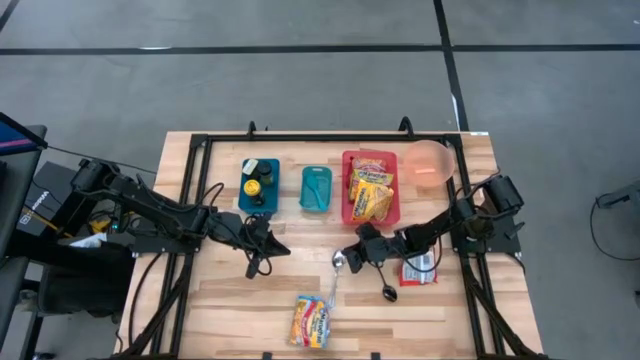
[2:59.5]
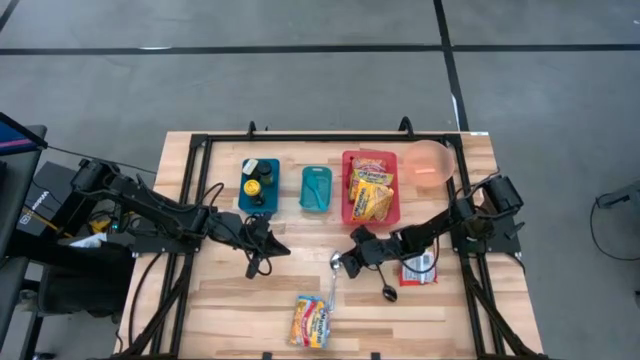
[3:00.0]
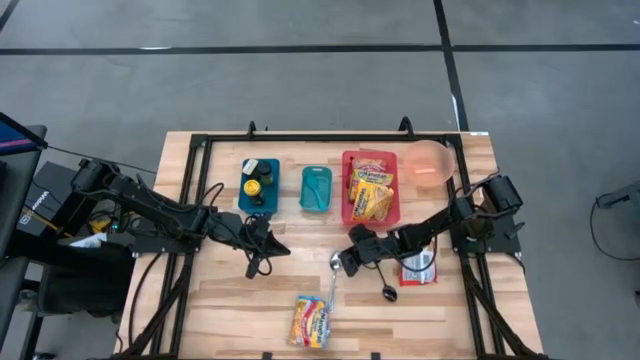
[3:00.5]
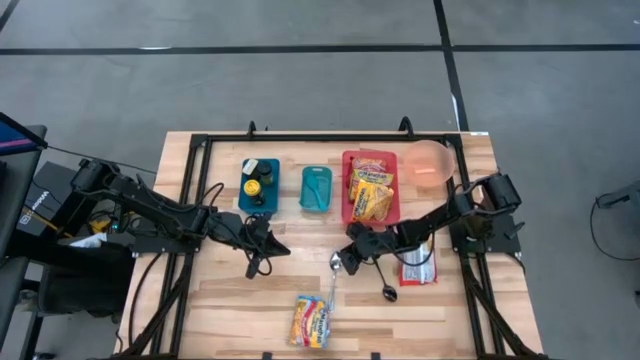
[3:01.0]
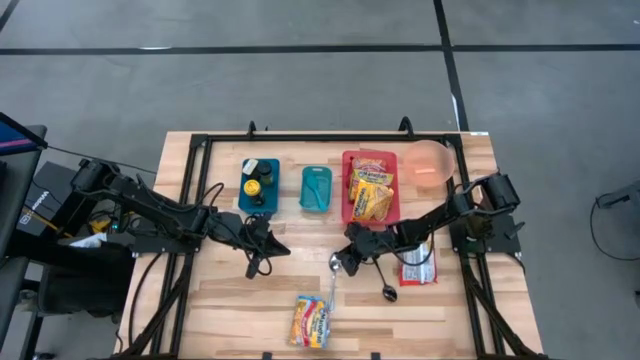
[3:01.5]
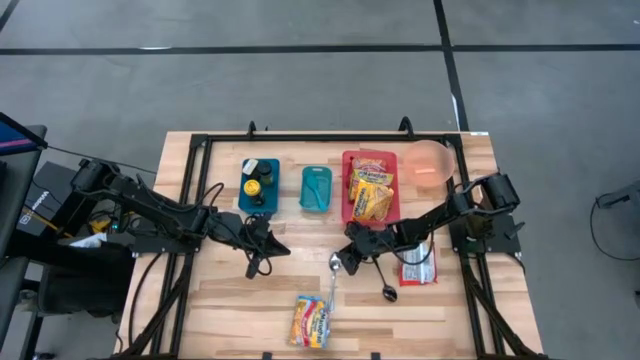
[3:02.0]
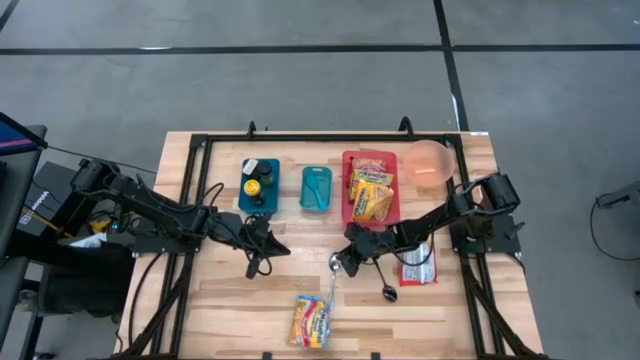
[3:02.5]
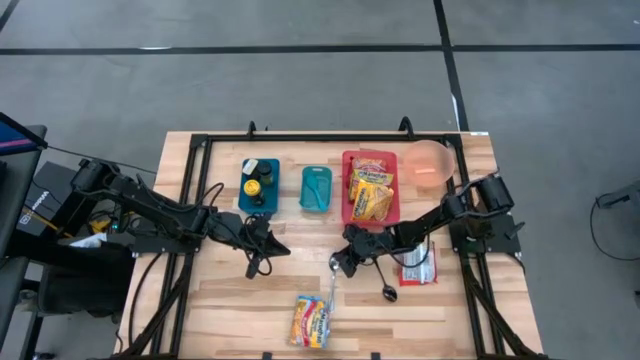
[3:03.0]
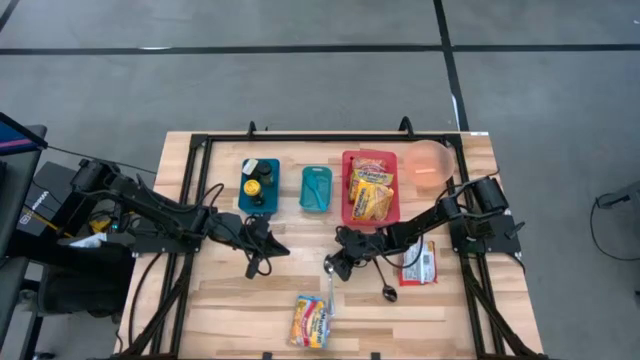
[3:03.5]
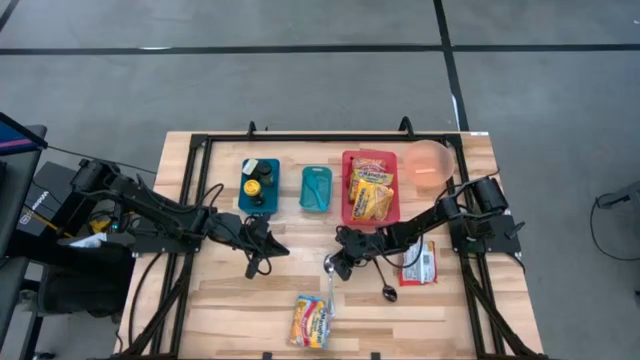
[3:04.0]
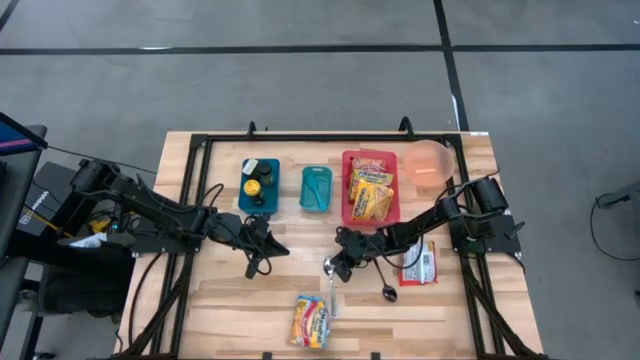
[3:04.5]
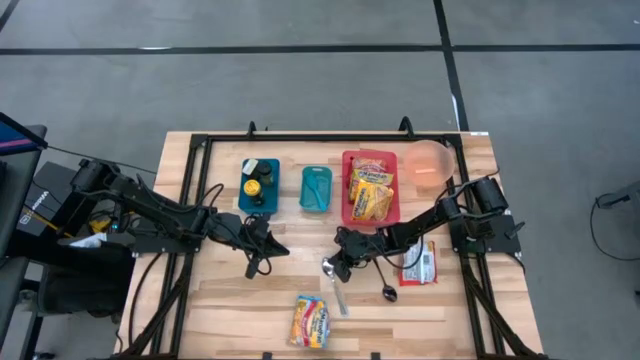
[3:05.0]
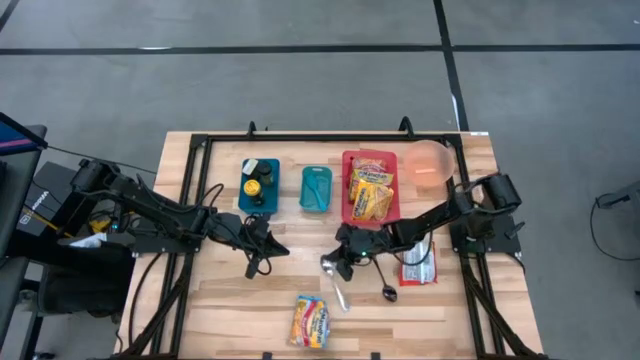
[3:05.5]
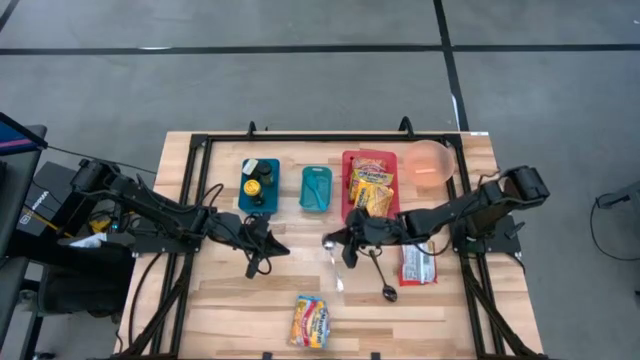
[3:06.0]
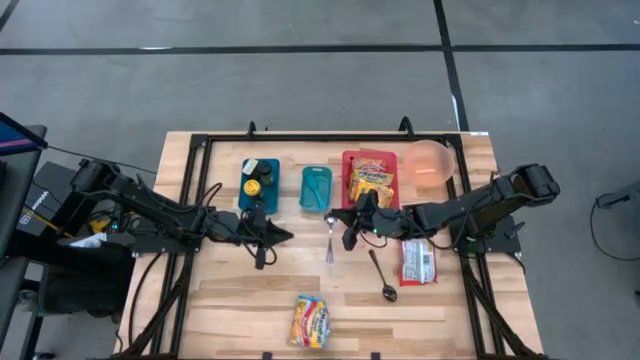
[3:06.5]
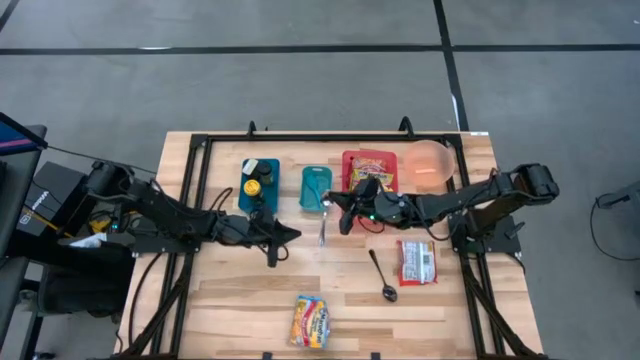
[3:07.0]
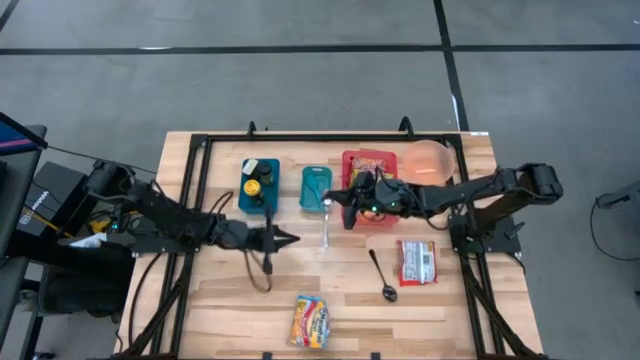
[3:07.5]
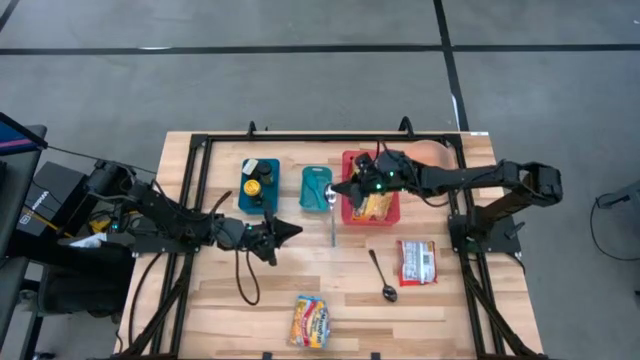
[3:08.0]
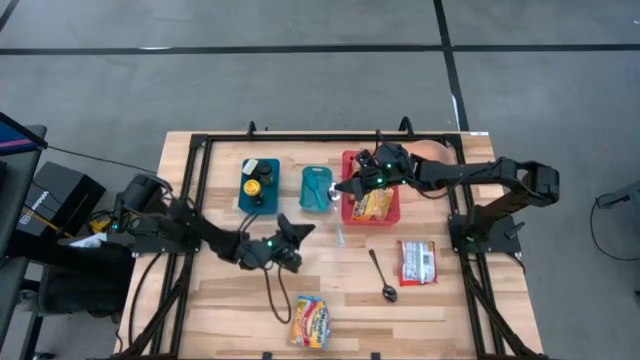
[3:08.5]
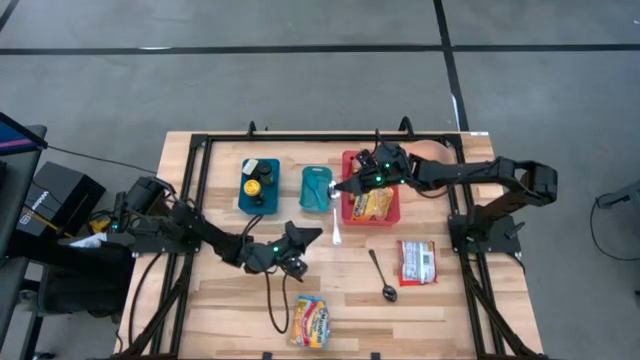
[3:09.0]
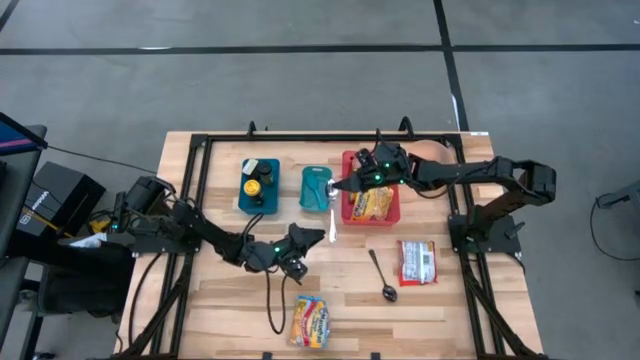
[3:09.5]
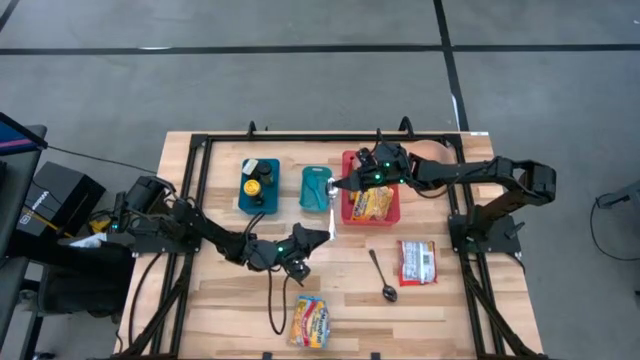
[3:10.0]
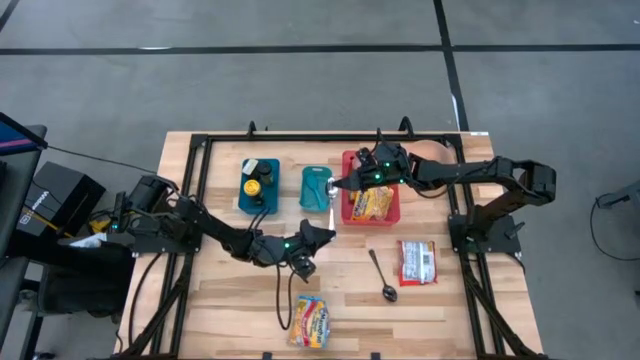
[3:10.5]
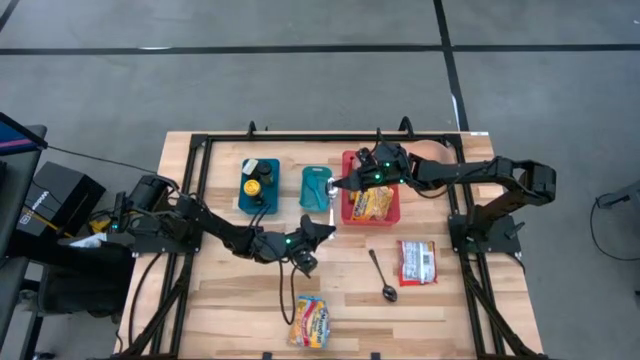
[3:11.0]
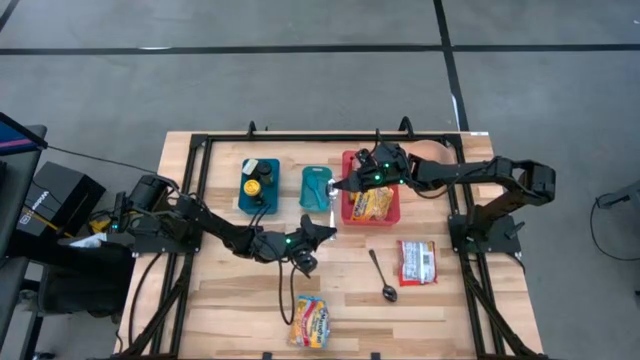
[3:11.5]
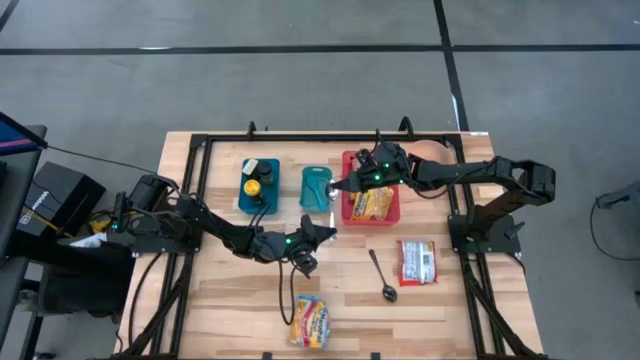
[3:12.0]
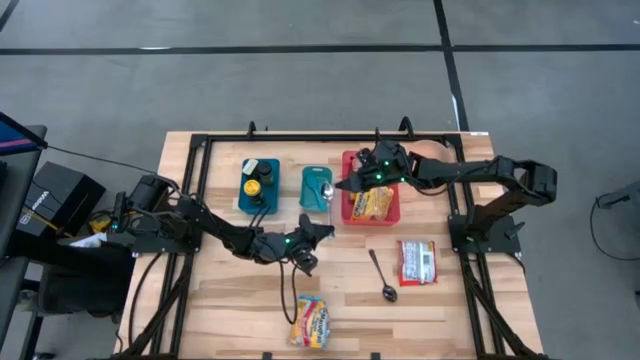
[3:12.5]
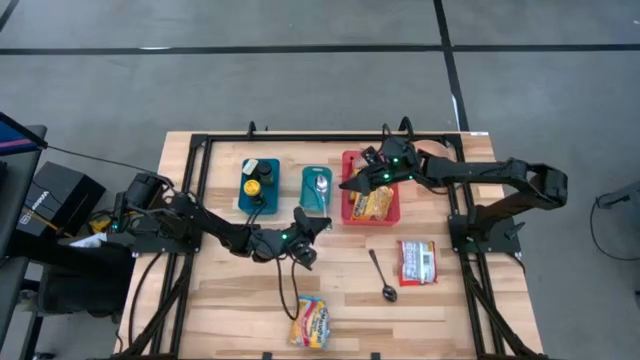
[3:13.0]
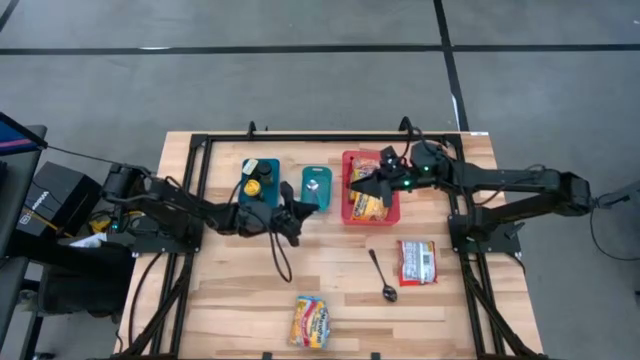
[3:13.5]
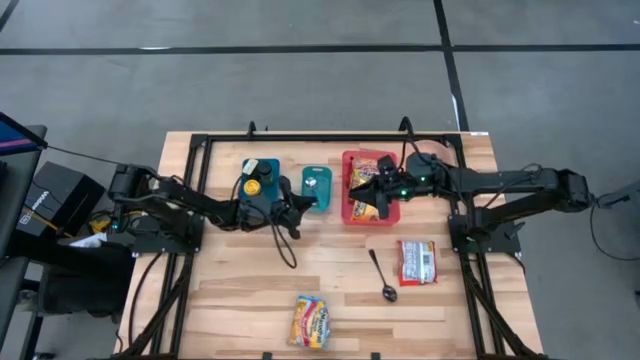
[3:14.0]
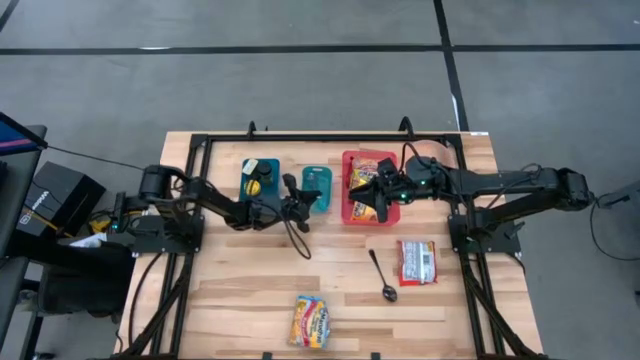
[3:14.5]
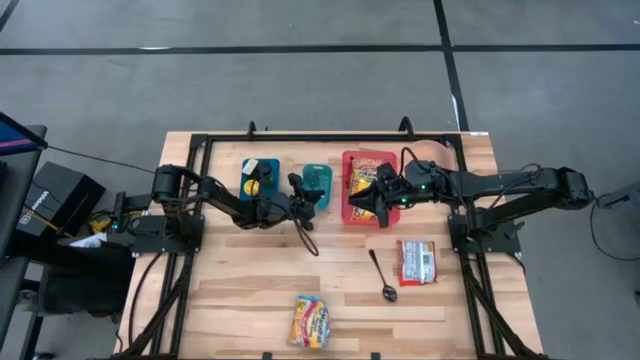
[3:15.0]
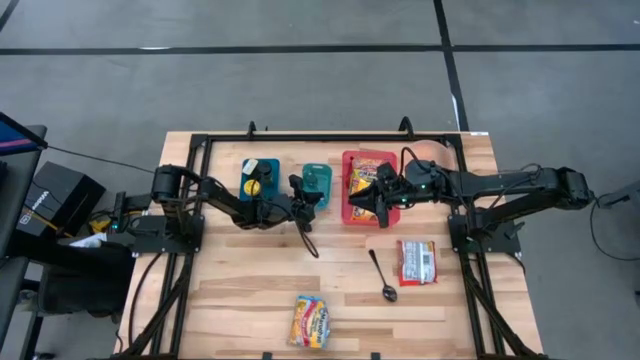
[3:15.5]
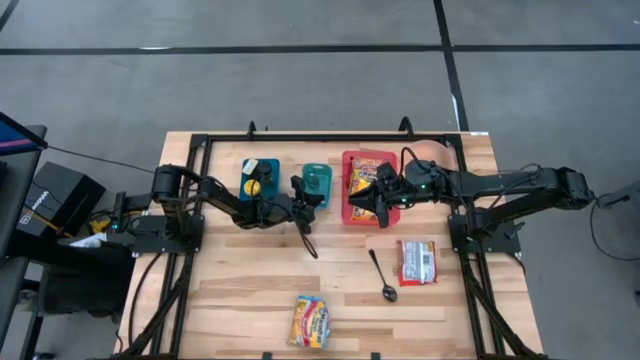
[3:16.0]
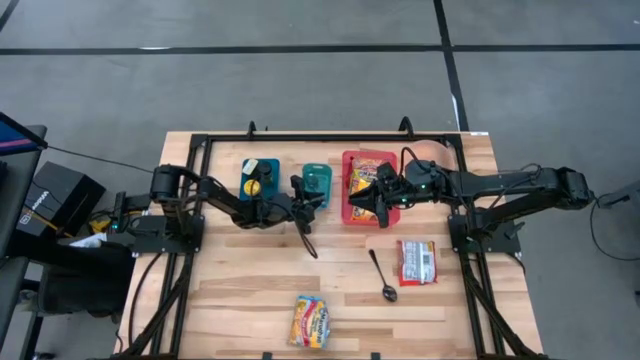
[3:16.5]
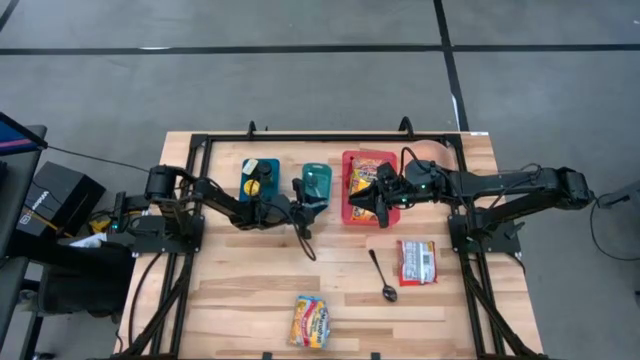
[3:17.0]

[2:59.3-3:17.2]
Task: Pick & Place Food Item
Put the silver spoon into the green bin
